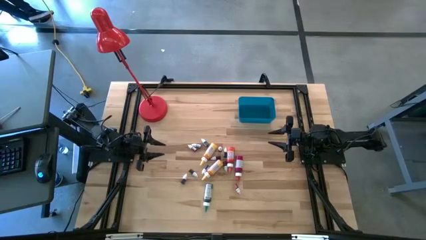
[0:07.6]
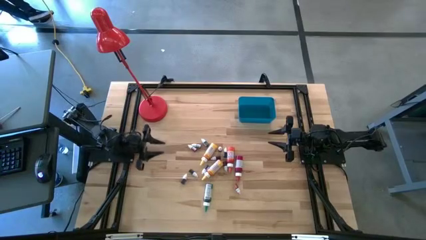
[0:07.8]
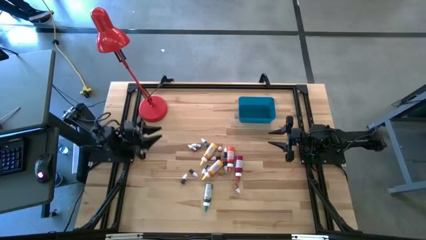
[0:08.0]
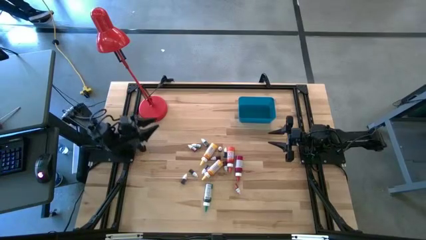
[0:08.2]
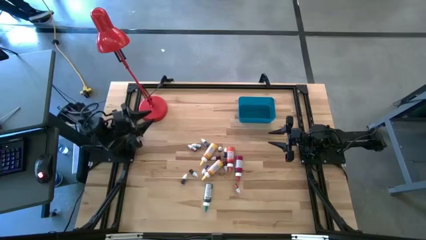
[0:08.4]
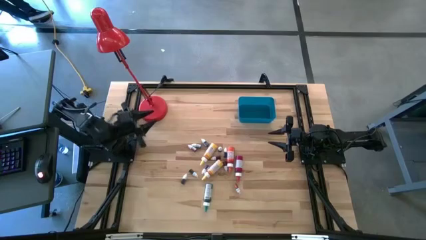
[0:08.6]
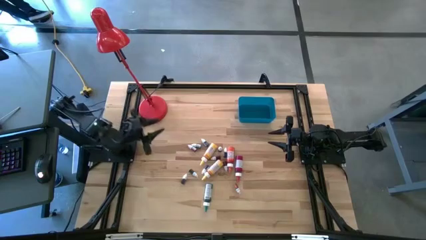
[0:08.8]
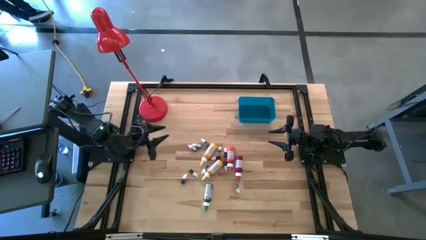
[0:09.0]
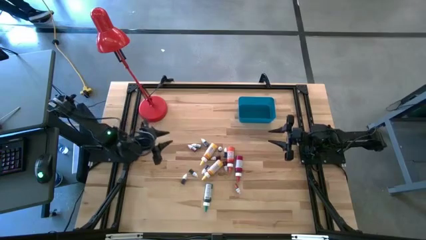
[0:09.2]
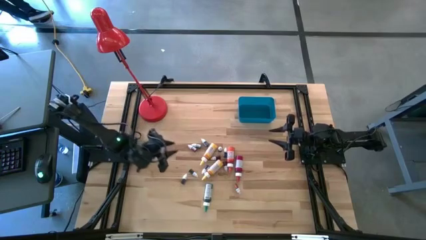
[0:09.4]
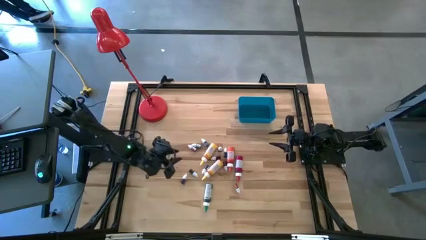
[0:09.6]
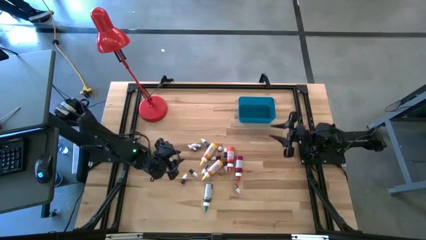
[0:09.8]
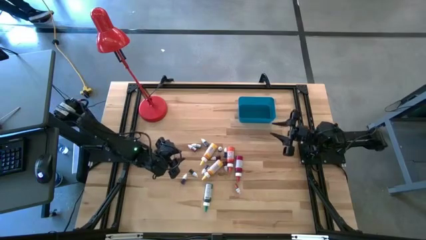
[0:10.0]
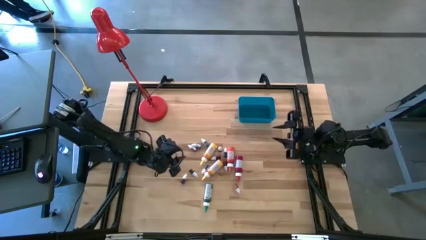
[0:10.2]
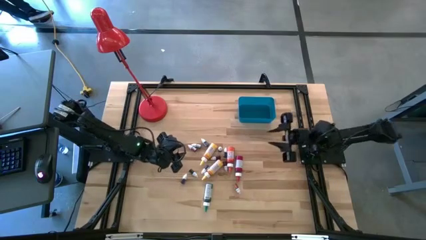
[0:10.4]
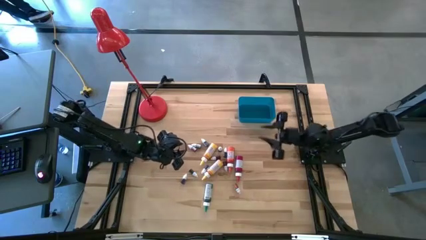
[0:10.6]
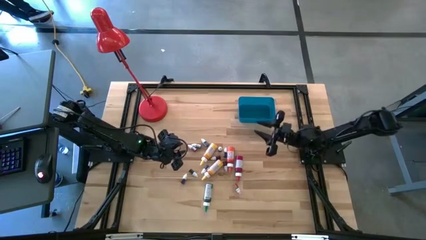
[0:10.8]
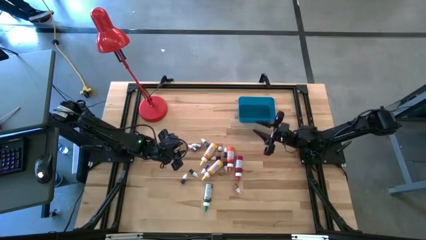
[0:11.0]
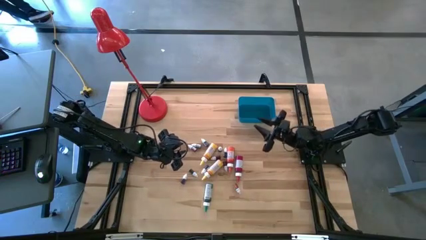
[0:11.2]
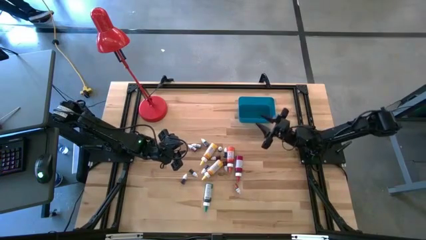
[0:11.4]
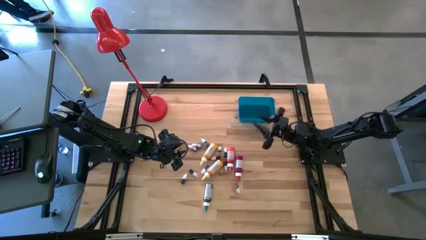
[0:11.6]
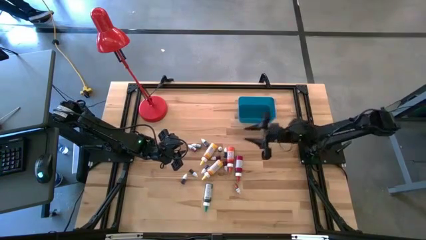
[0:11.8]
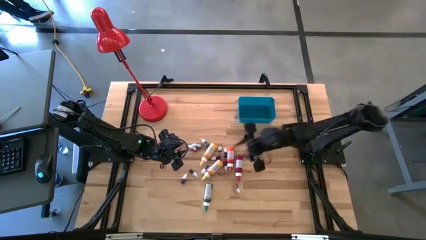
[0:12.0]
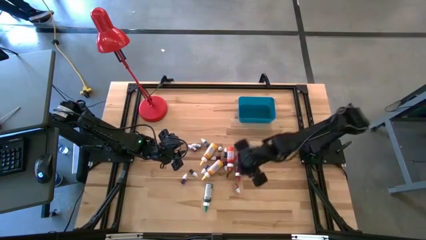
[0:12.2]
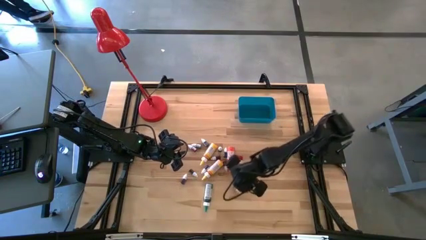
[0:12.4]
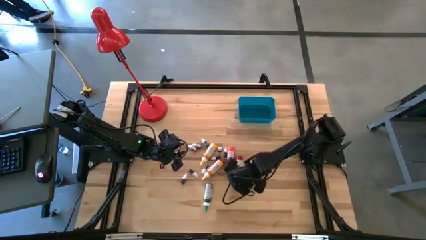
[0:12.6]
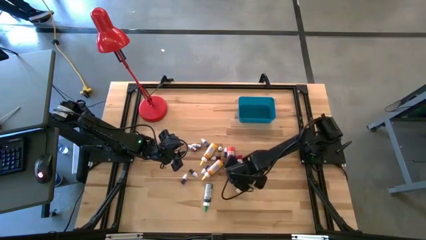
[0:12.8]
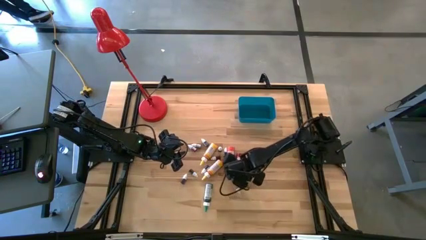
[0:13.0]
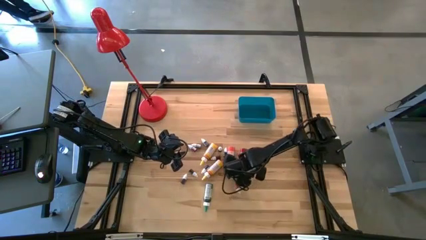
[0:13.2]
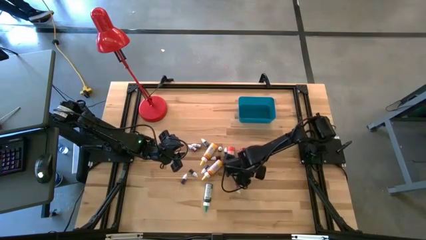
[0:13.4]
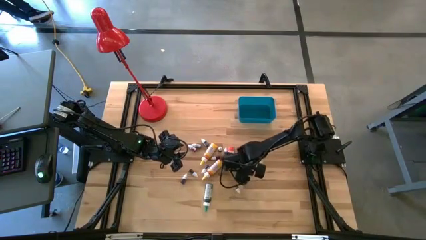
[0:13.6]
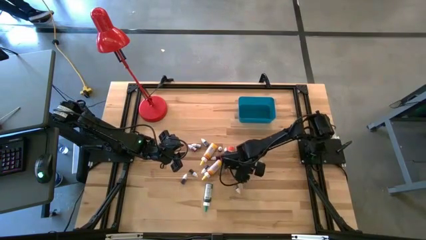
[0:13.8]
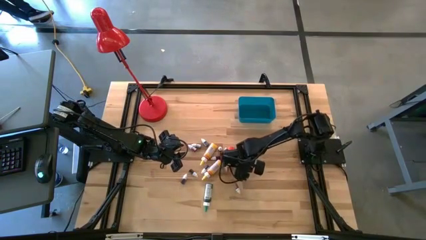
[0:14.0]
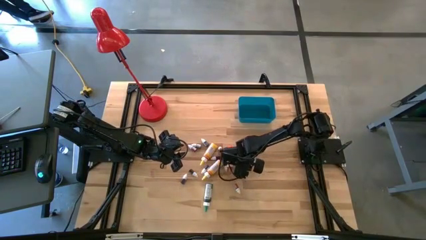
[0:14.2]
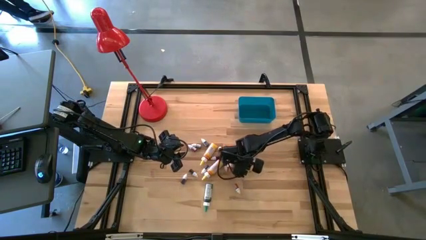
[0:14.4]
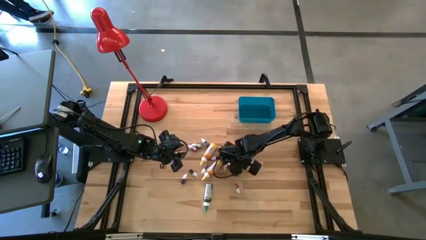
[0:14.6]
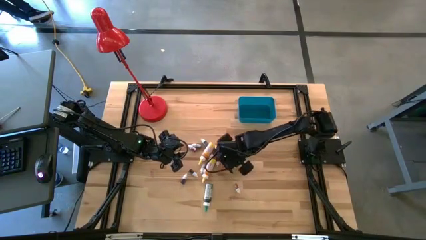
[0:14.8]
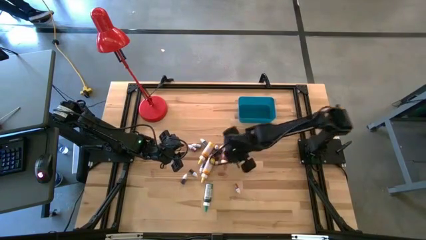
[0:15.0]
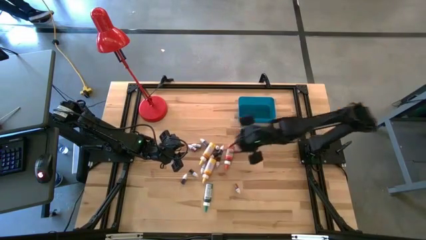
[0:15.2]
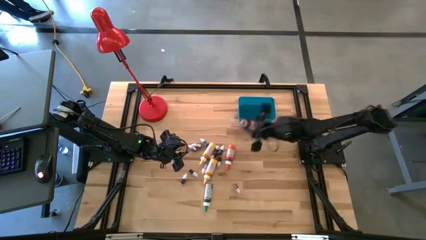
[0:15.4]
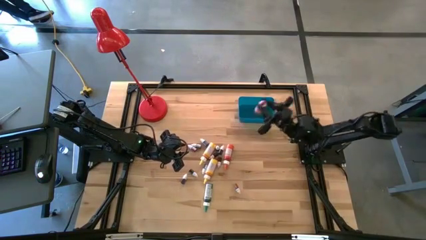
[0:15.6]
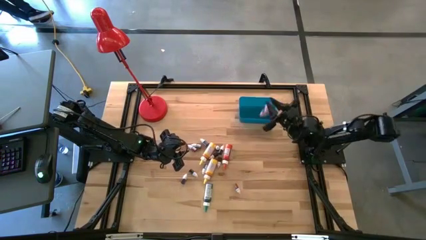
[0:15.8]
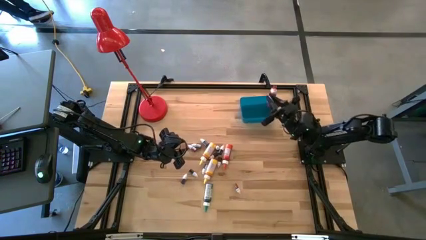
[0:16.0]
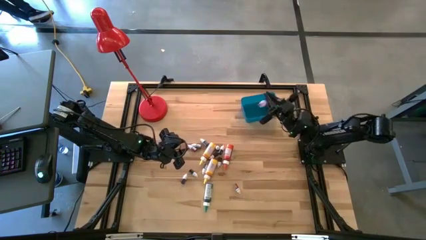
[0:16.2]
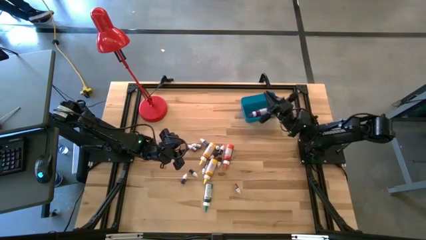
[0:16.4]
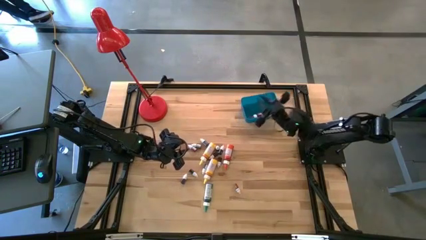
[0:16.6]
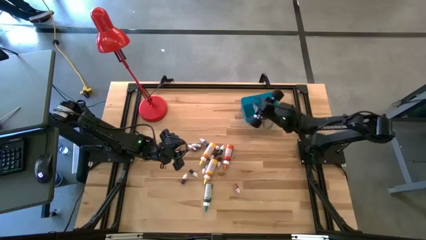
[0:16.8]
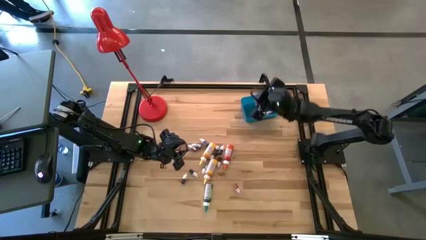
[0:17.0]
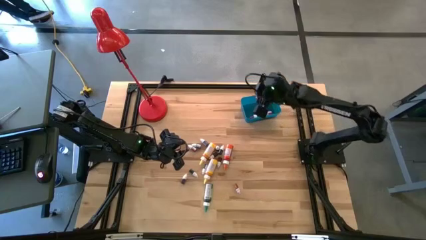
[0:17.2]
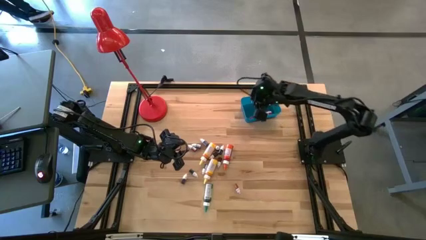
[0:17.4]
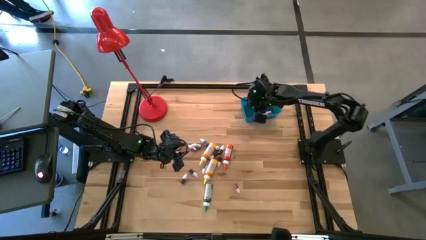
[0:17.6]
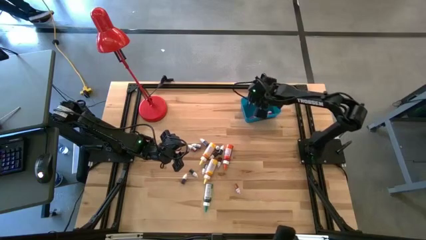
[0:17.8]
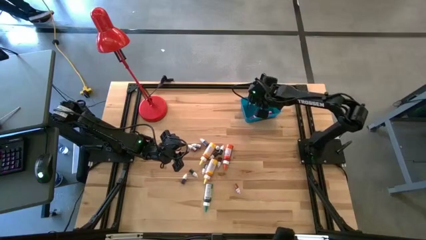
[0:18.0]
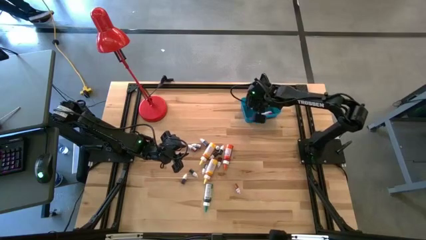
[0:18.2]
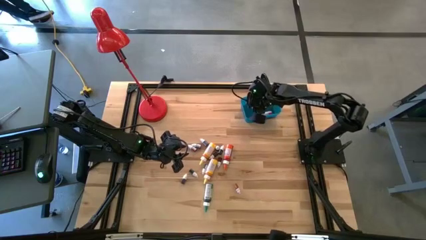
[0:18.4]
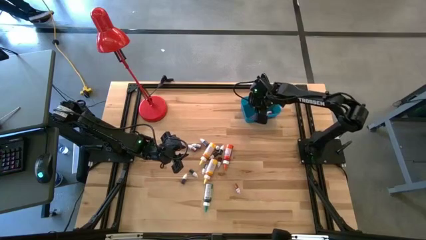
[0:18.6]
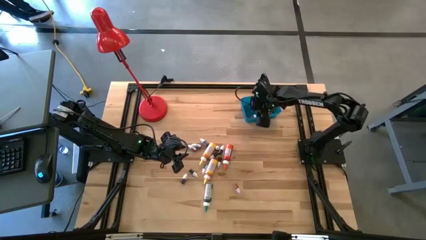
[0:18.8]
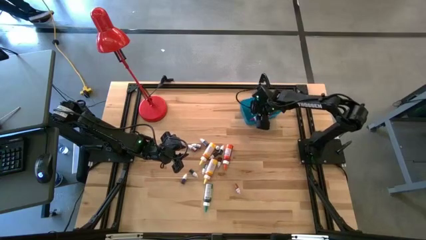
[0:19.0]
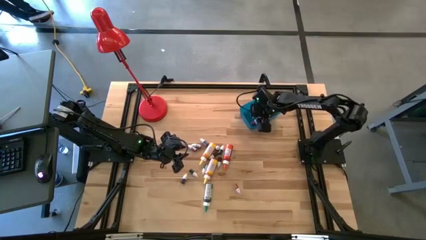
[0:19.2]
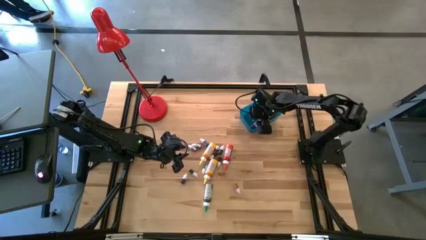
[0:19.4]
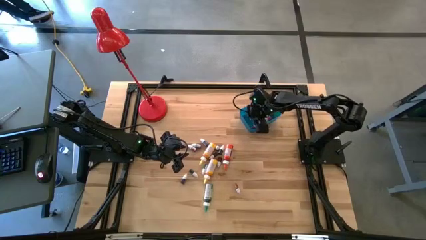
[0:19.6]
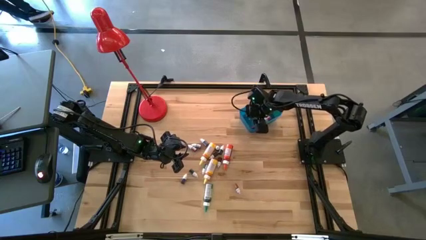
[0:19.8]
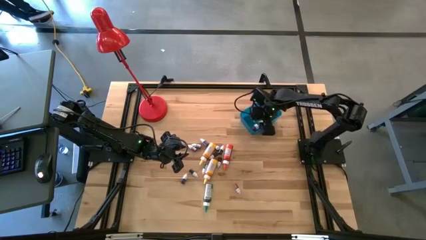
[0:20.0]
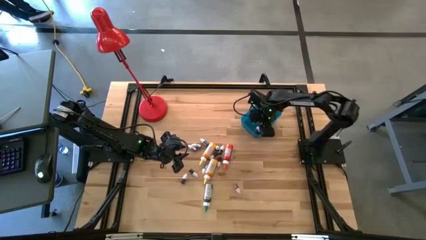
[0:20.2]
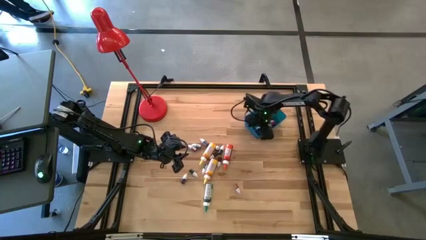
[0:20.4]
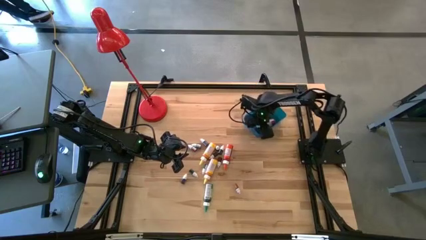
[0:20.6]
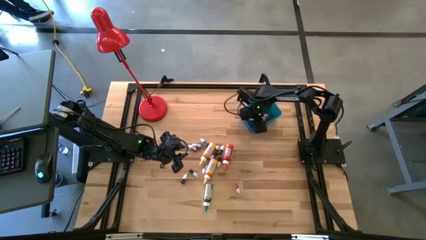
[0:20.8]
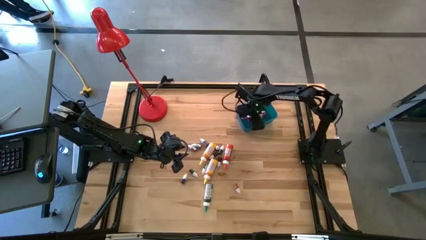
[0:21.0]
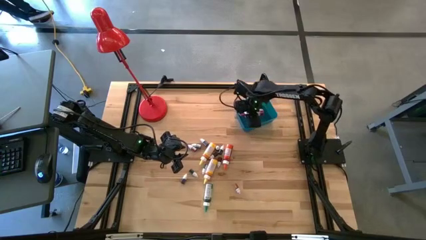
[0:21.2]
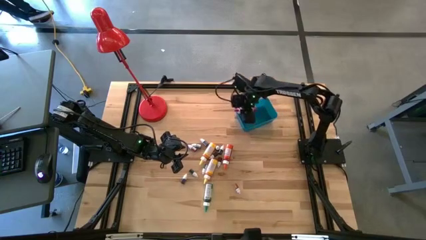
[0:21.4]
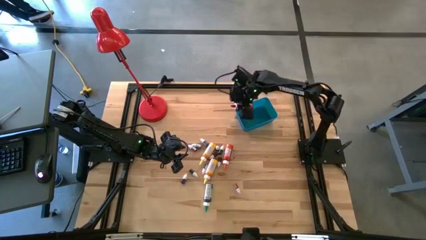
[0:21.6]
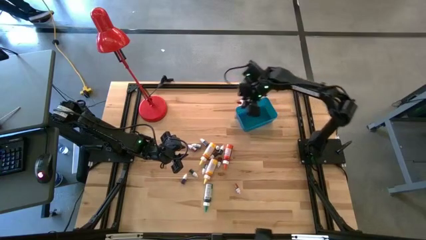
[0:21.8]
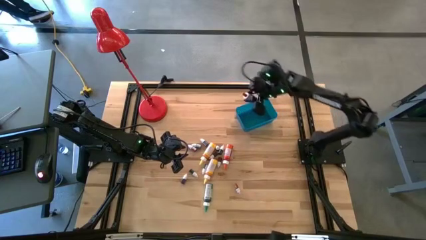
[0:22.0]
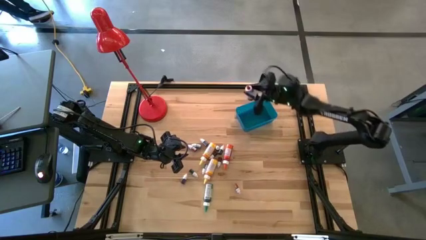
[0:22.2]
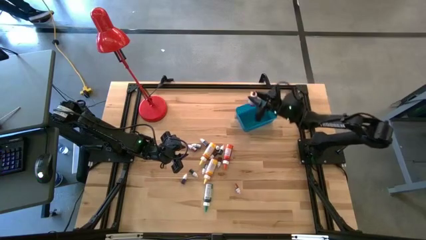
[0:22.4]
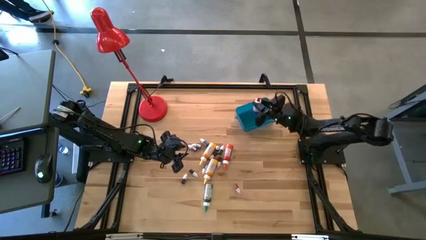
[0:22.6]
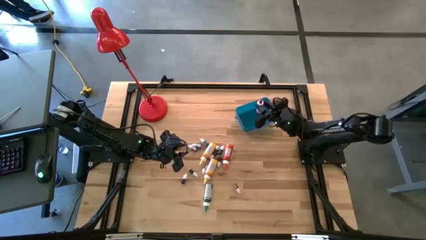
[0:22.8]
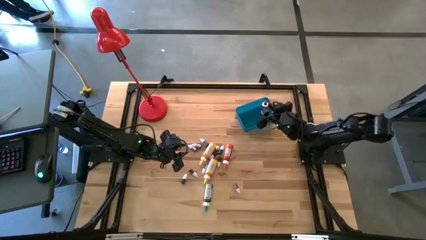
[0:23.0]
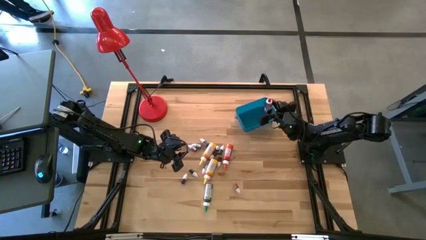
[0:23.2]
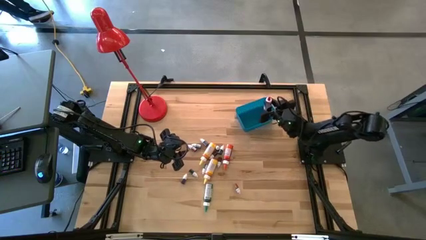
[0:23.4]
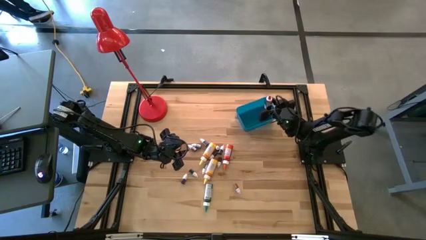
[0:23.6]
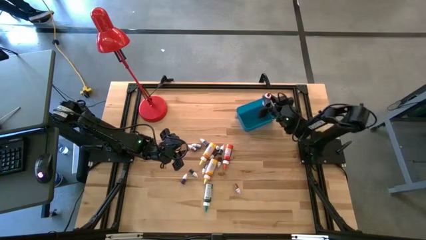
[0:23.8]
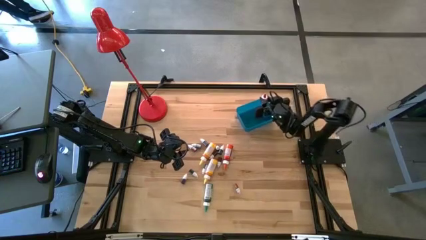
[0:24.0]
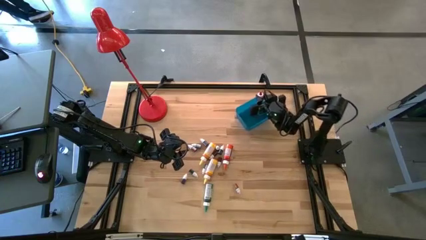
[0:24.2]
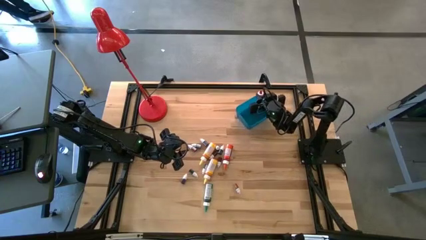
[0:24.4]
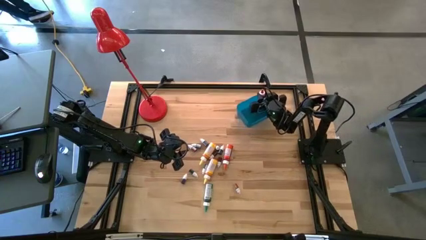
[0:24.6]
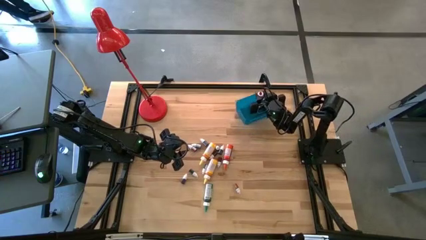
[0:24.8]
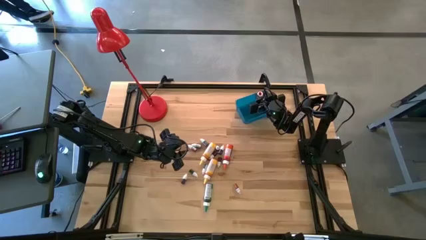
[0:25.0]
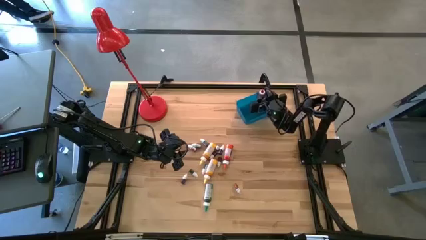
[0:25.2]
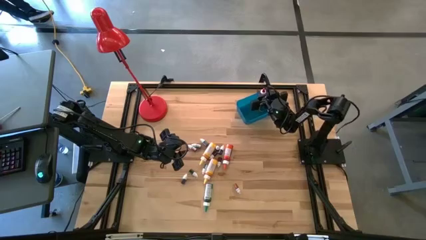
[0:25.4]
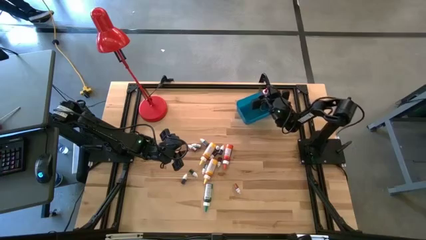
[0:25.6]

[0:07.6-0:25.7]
Task: Pick & Place food coloring
Put the big red food coloring bottle into the blue bin
